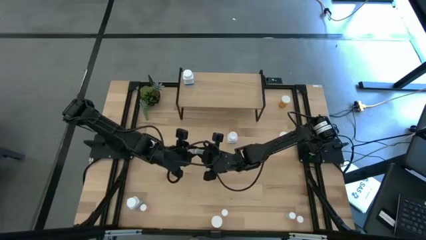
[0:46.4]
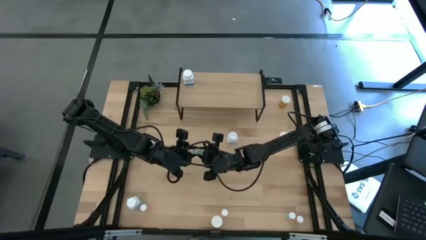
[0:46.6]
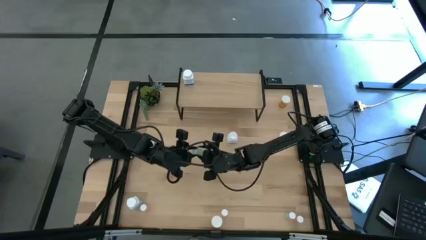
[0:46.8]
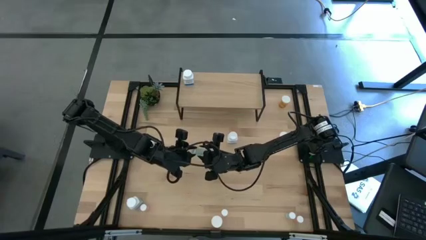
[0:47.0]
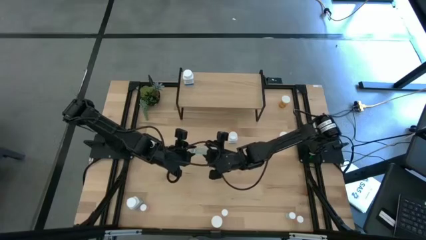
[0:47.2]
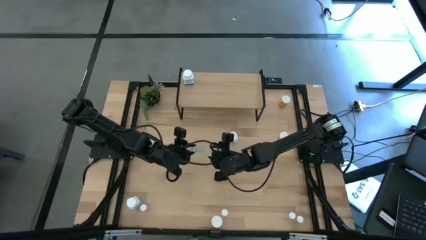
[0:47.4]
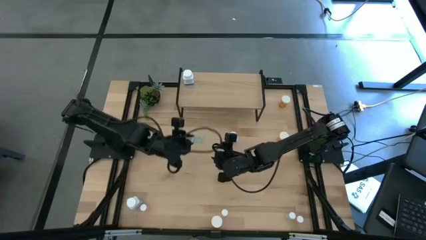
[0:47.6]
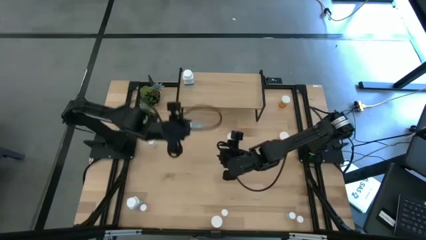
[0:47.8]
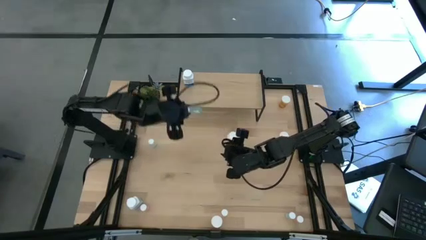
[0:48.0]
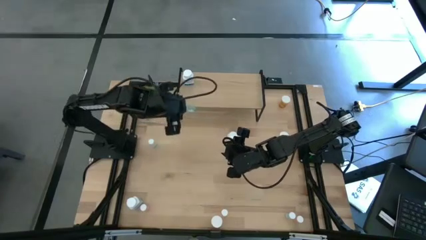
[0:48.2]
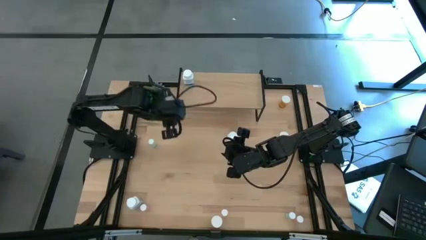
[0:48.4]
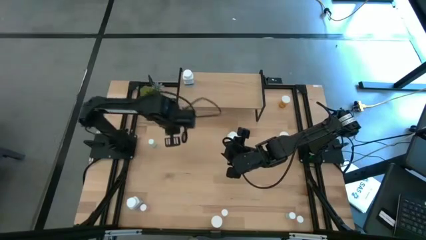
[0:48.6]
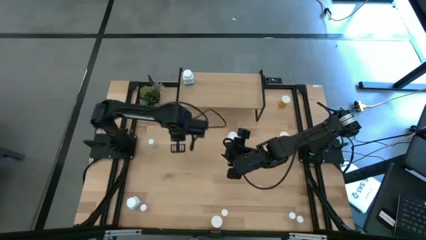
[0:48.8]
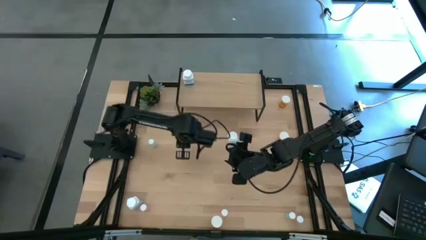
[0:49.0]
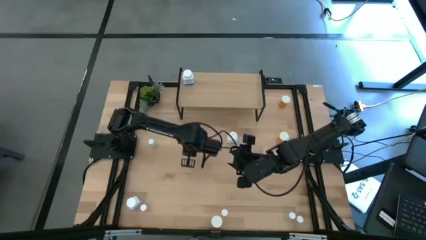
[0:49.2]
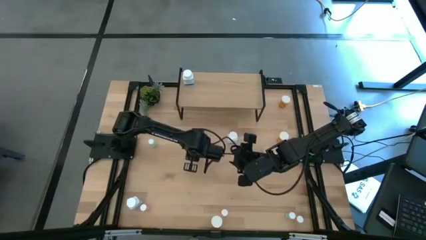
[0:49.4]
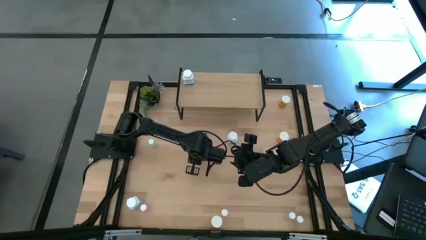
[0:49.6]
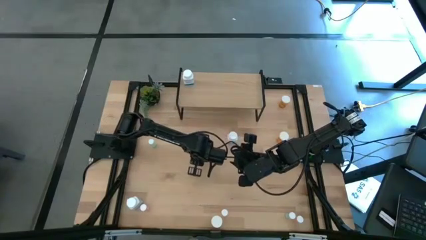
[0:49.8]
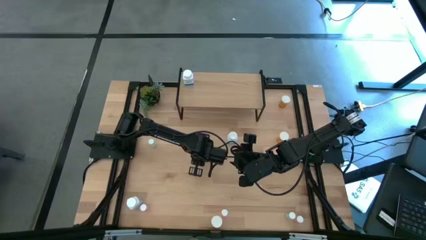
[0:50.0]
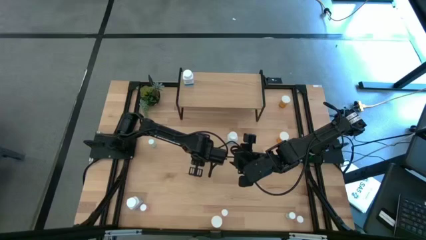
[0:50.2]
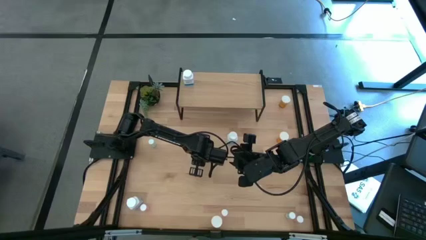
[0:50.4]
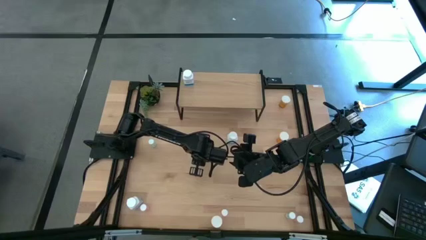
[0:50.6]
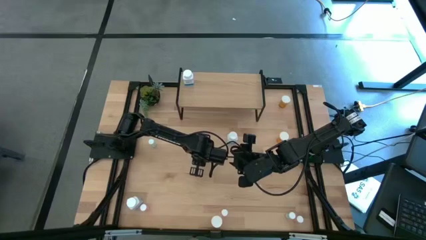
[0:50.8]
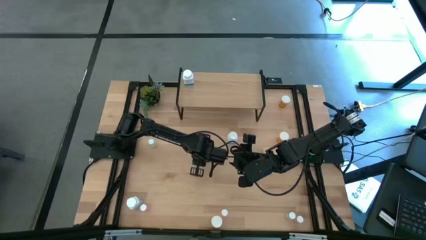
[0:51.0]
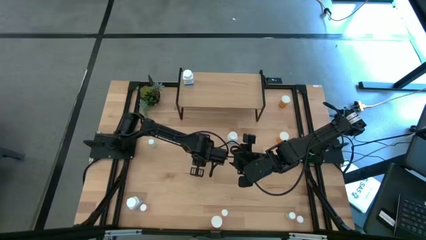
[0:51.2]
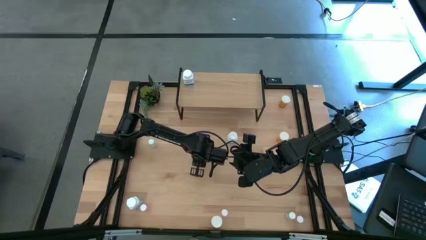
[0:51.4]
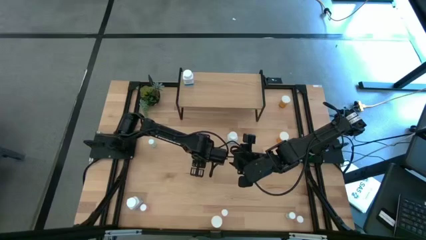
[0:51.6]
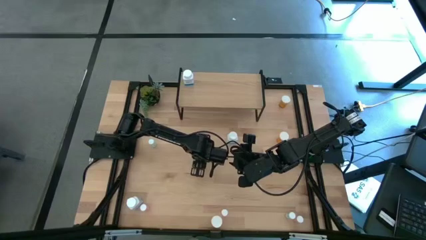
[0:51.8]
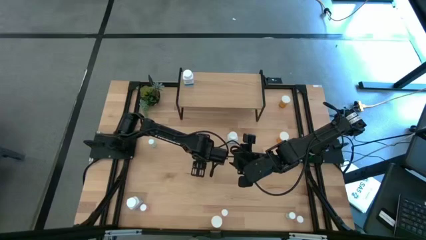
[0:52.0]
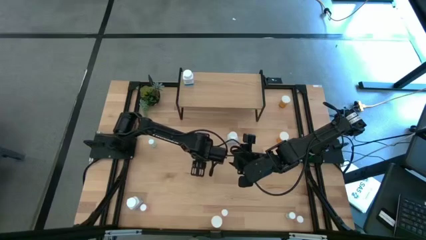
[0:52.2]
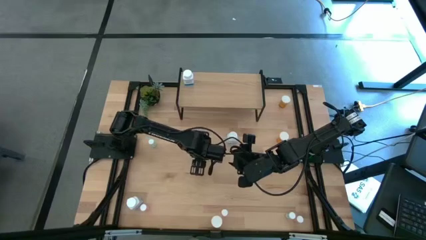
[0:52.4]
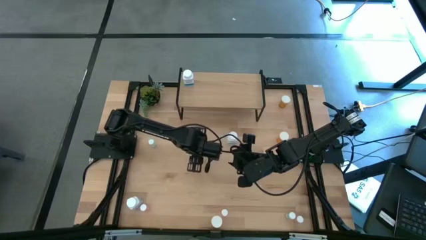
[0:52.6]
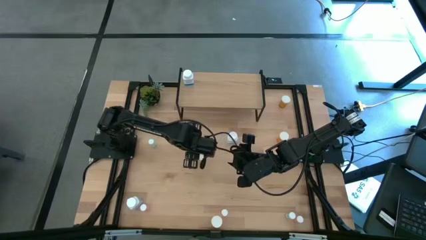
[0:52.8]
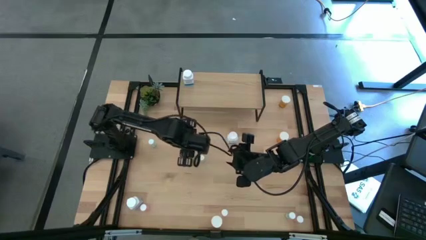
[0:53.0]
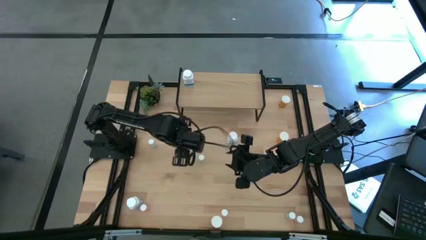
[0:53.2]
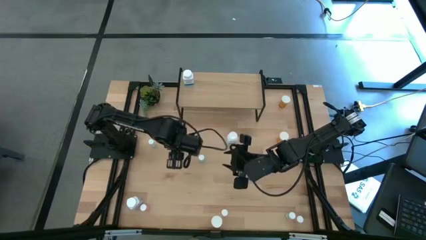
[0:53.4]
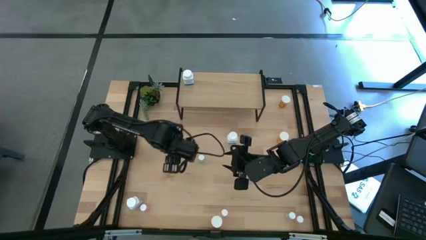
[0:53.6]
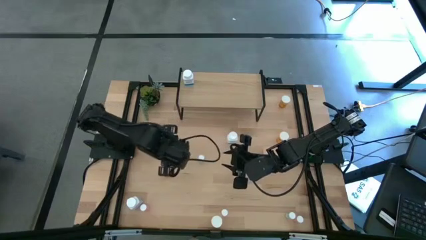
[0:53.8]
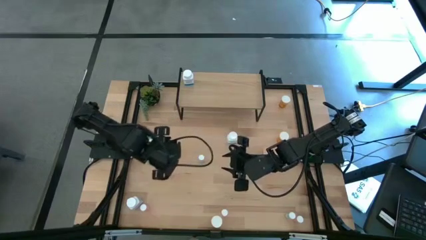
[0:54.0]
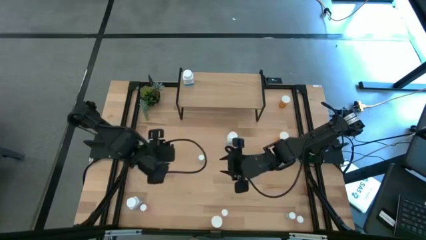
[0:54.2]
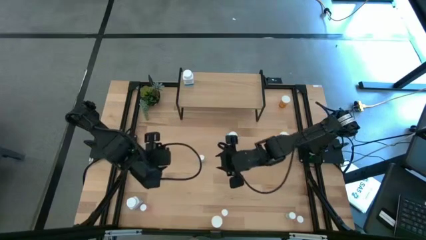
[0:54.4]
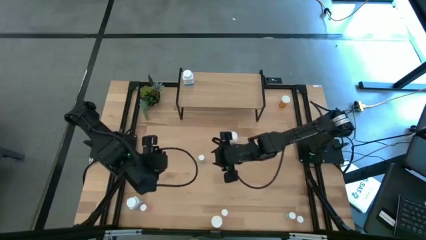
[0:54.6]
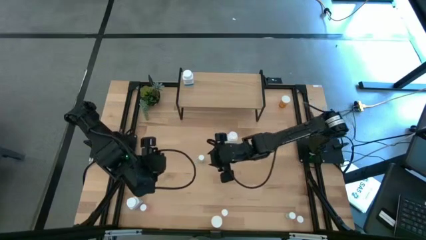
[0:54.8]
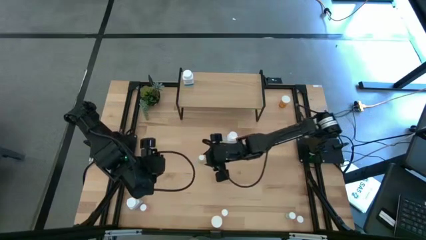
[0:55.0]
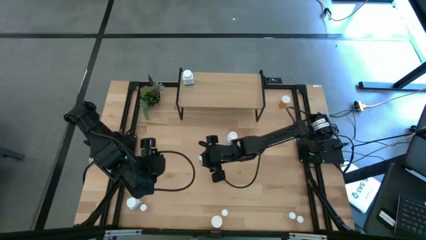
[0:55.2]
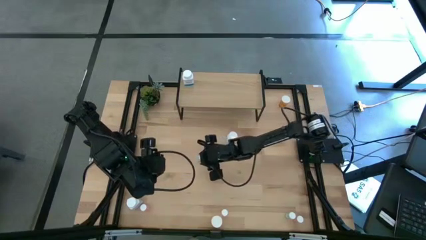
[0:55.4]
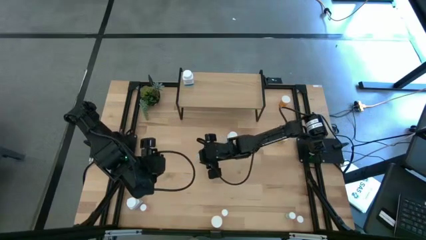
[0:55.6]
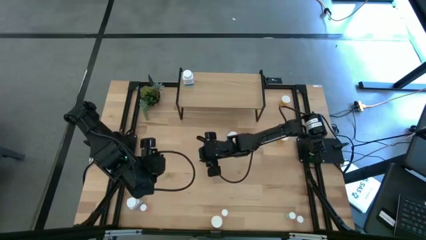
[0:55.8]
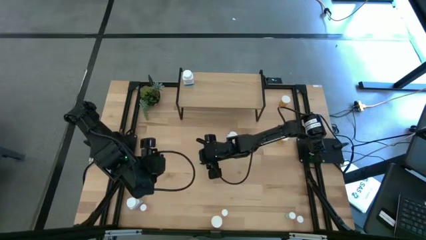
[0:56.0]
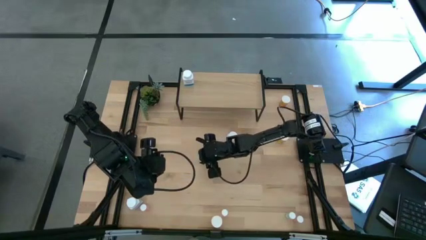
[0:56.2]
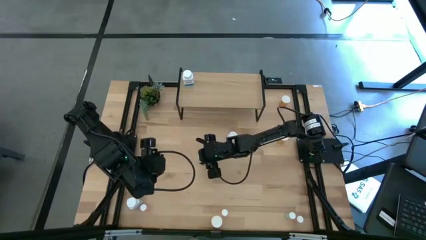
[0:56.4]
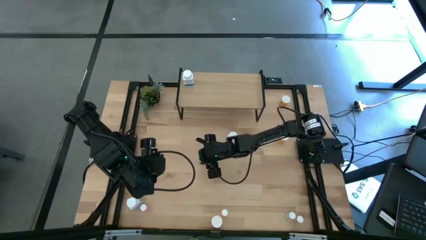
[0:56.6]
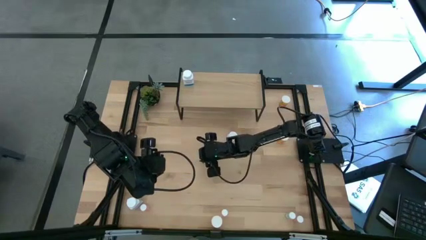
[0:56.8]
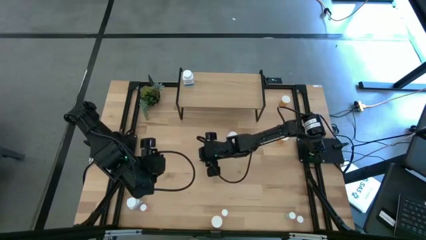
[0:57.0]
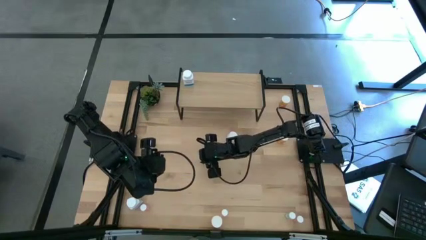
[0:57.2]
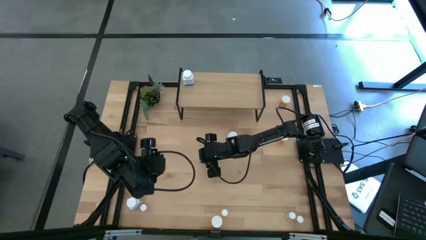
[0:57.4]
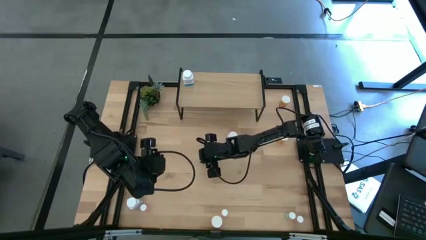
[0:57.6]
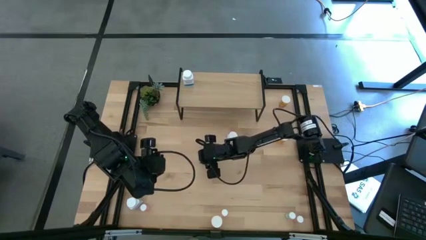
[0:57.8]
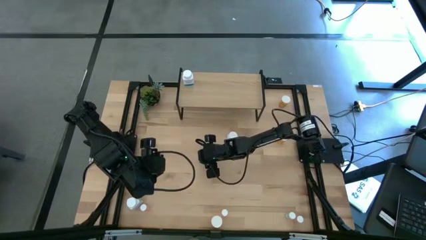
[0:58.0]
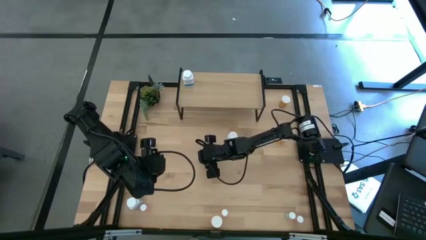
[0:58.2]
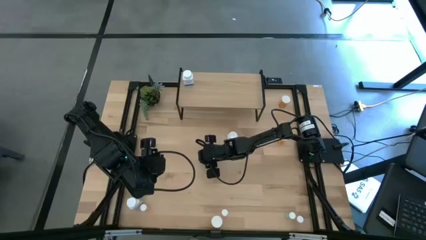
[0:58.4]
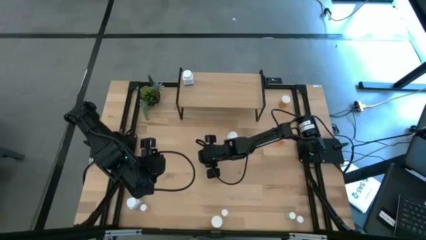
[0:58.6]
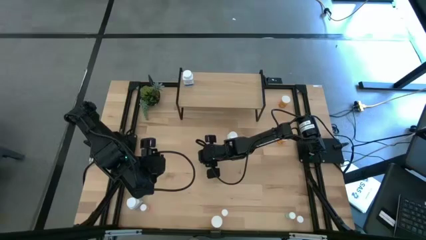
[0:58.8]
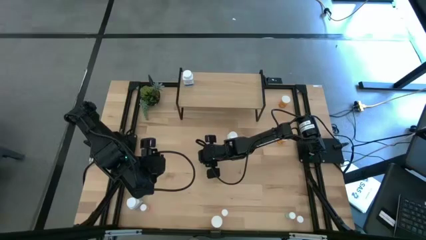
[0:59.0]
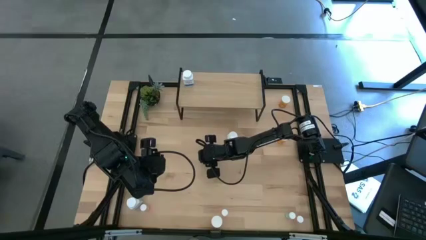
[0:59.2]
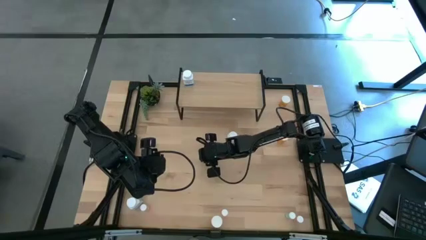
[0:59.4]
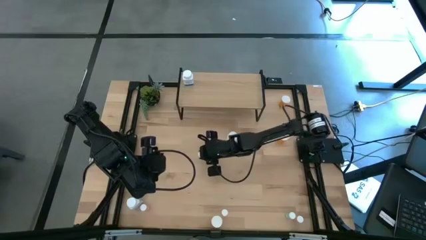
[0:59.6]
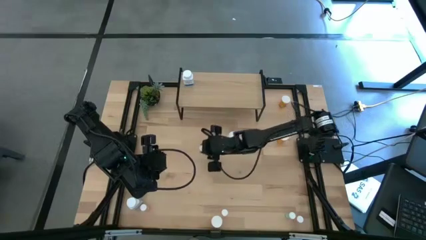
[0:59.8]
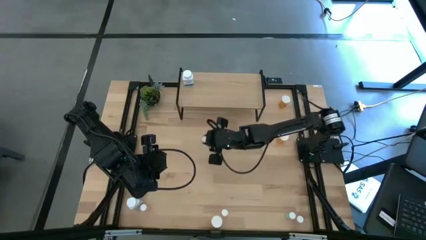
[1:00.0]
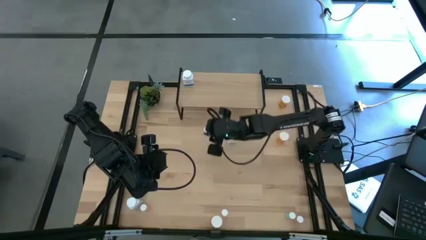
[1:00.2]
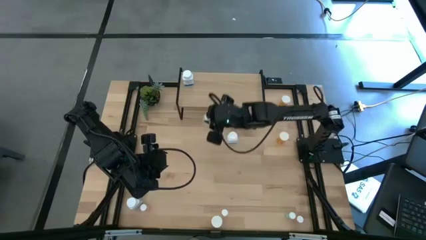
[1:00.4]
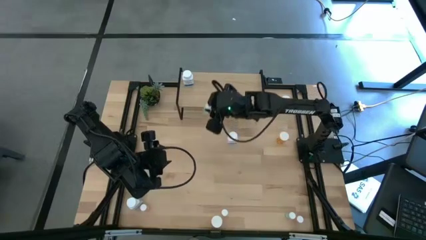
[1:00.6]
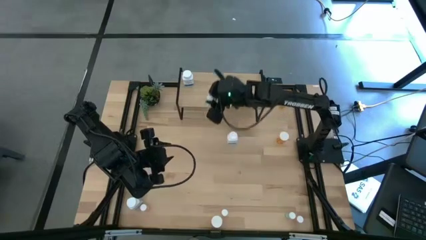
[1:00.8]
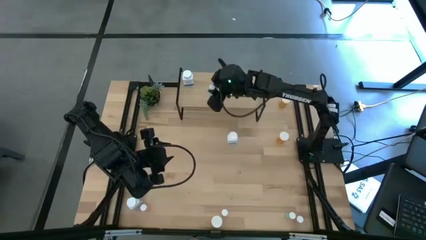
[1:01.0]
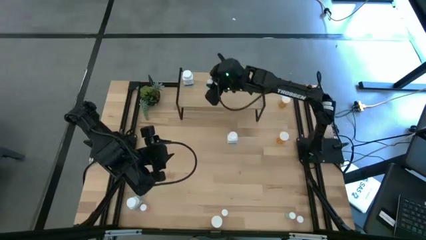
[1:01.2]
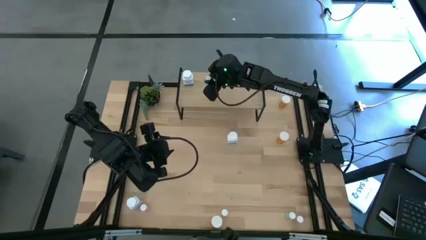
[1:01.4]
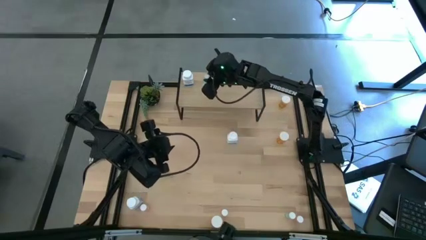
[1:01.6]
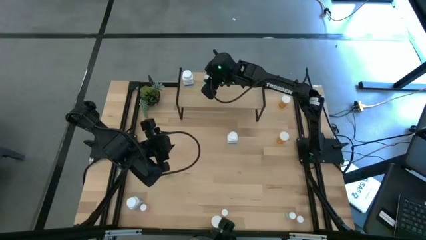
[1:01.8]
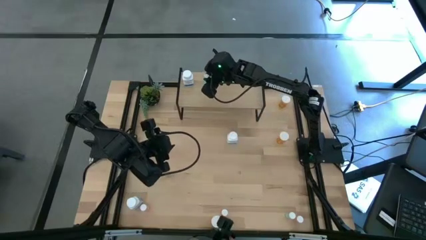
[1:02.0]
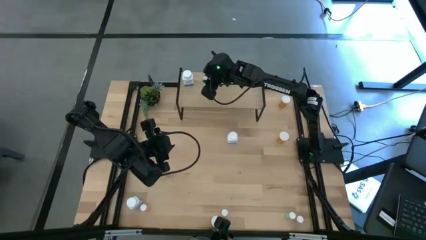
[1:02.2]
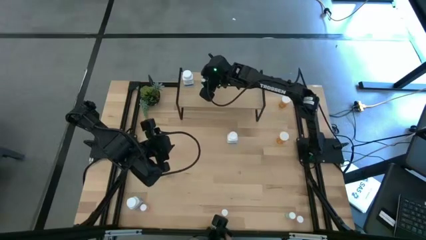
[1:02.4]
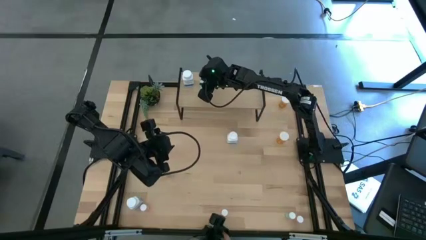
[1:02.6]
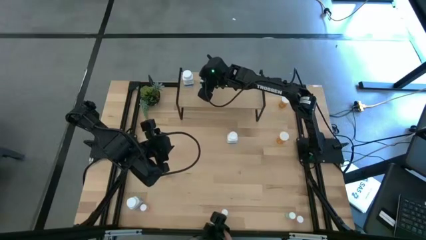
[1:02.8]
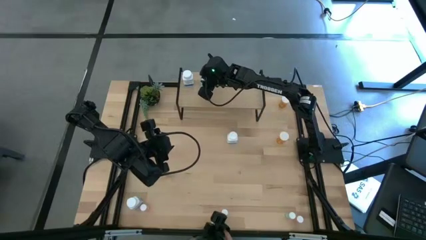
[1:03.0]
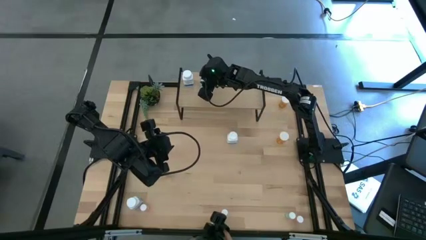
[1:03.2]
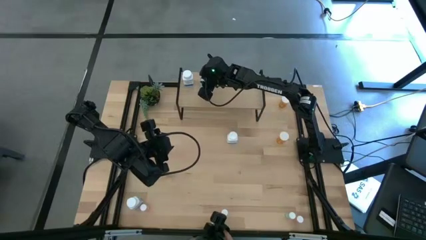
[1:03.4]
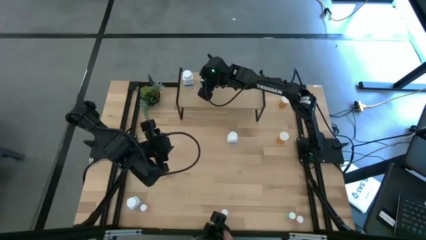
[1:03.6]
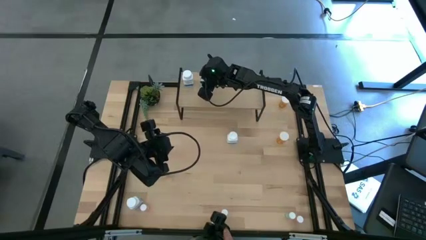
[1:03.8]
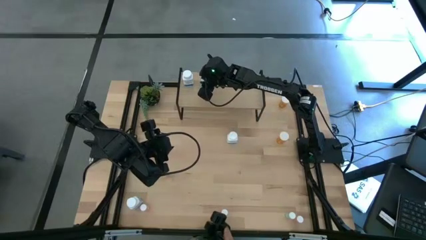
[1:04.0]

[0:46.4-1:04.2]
Task: Pick and place medicine bottles onto shelf by color
Put the top right blue pill bottle on the shelf
